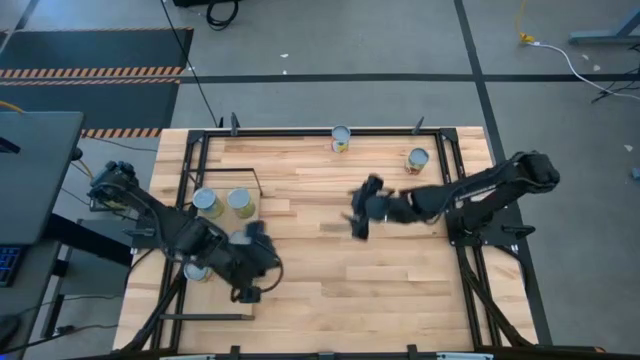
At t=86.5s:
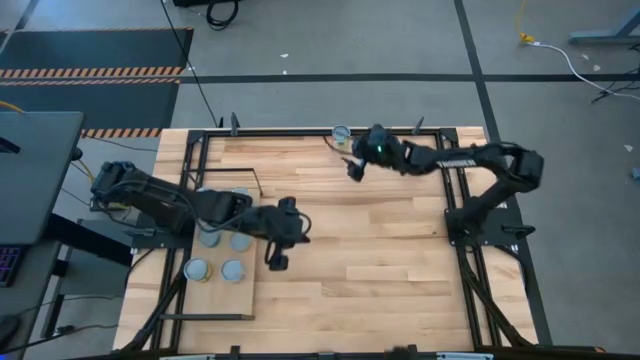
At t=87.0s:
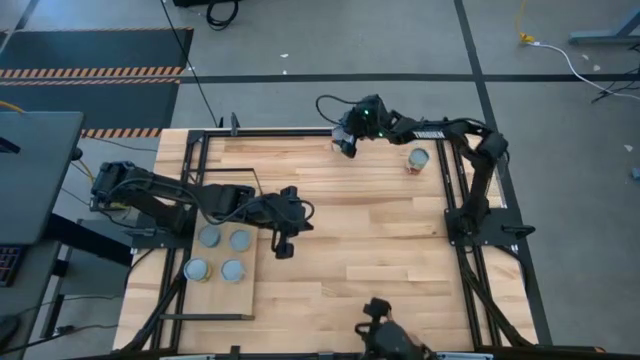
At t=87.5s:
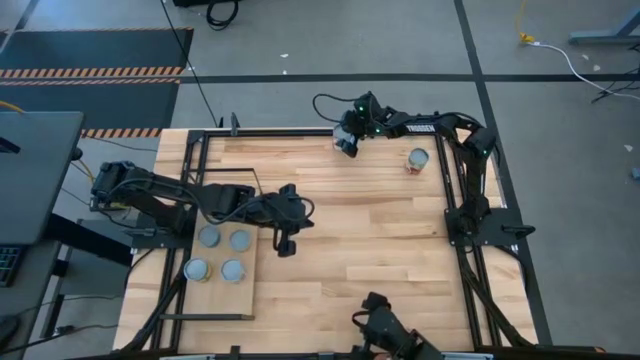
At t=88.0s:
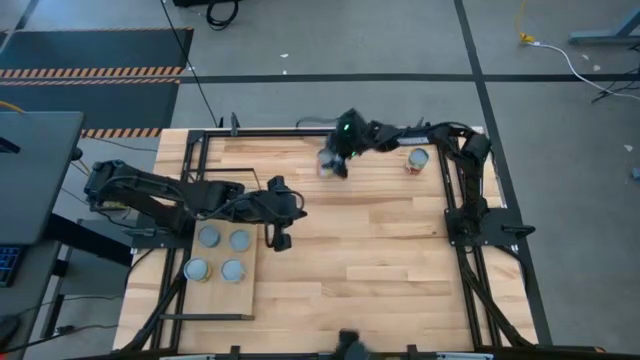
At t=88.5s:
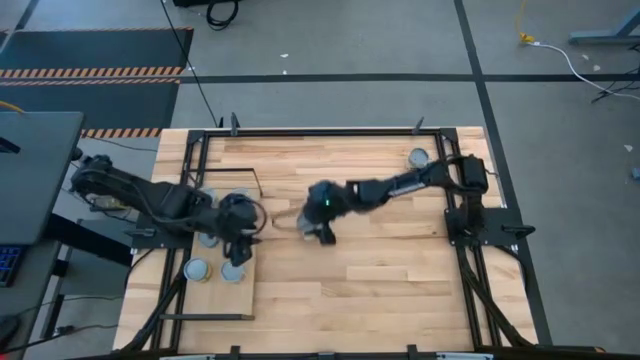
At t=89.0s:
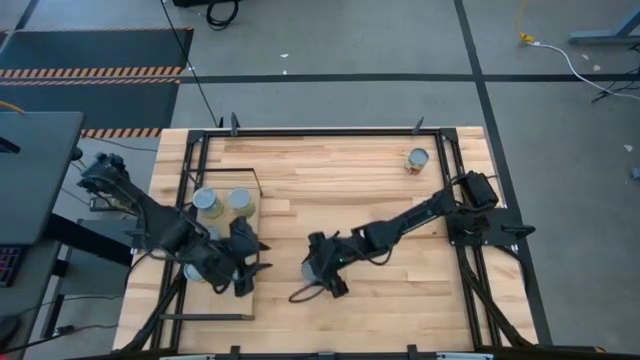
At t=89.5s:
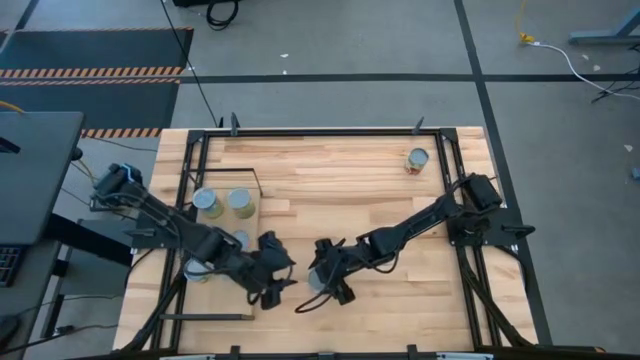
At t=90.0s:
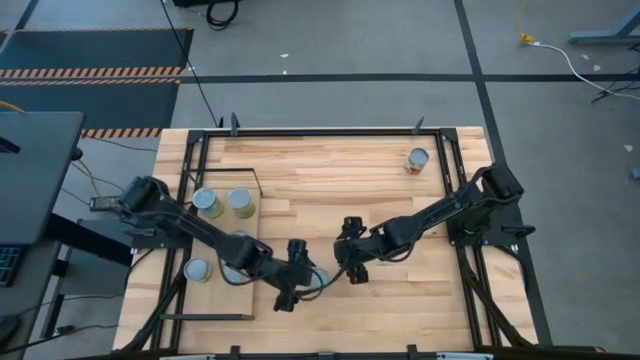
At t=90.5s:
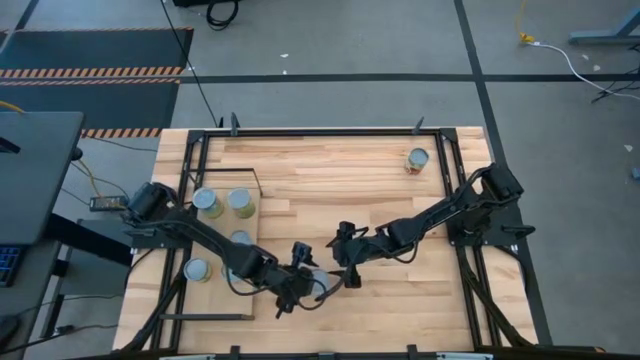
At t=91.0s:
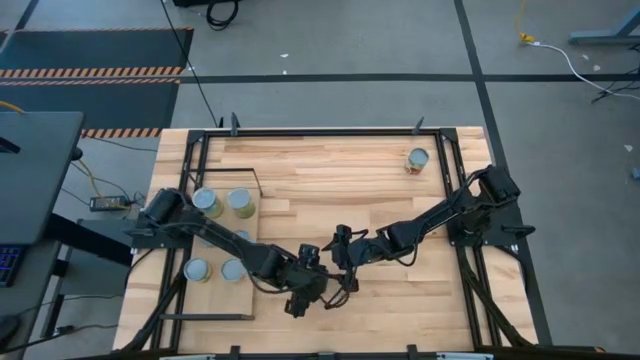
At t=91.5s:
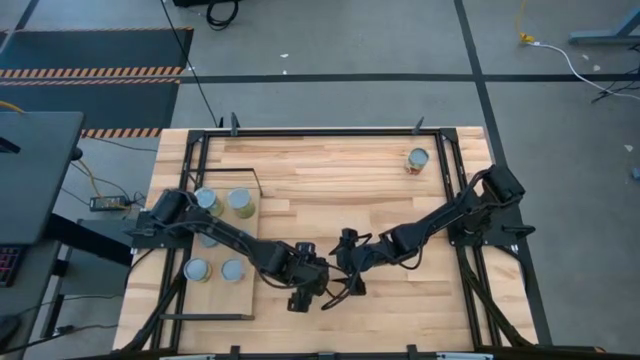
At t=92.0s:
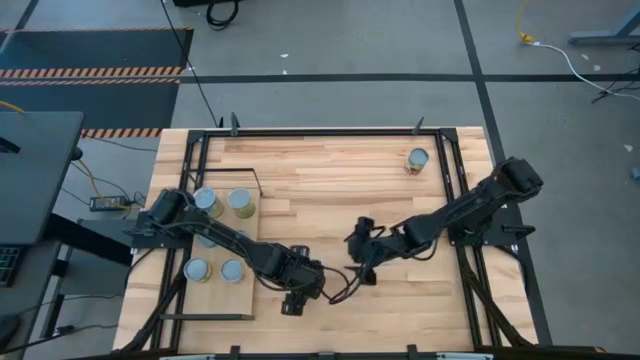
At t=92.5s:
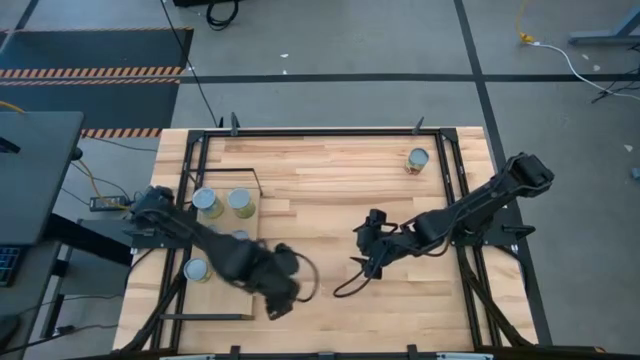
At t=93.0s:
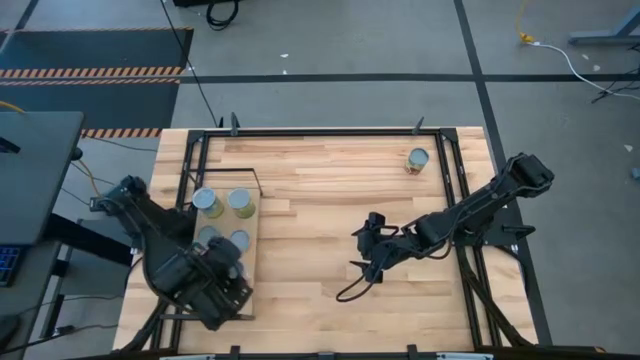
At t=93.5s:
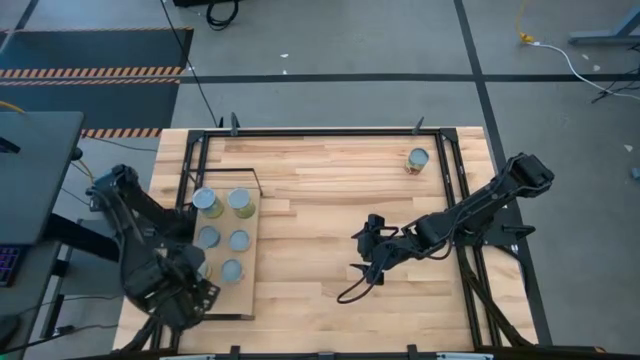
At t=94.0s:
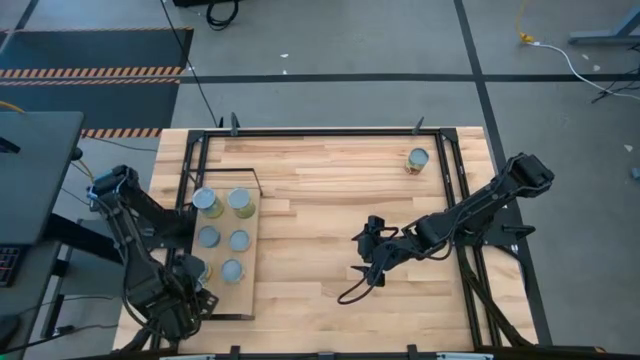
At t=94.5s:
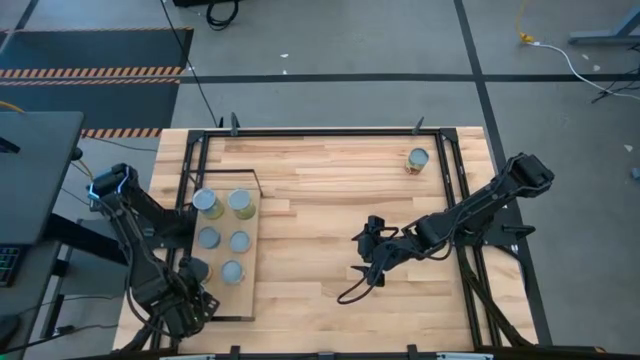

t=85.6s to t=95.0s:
Task: Pick and place cans onto a shelf
Put the canned mixed fruits on the shelf

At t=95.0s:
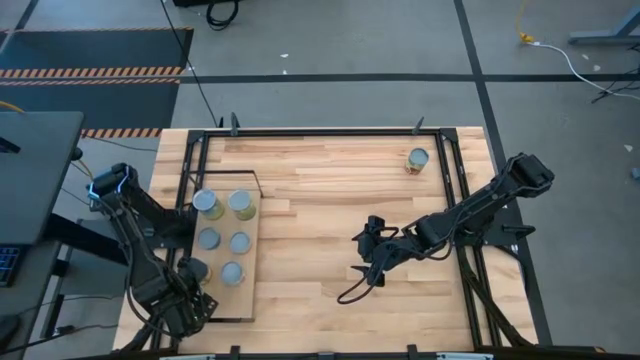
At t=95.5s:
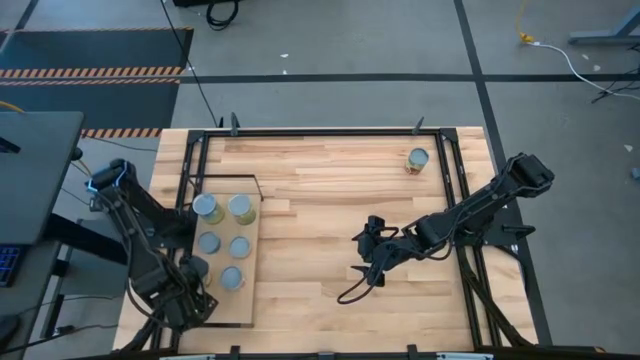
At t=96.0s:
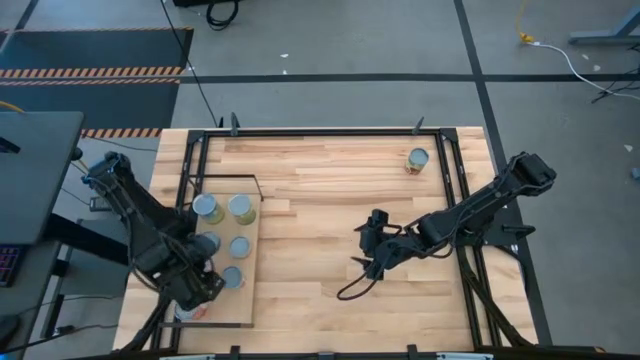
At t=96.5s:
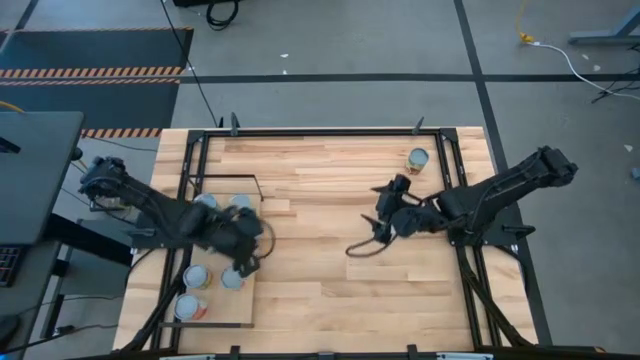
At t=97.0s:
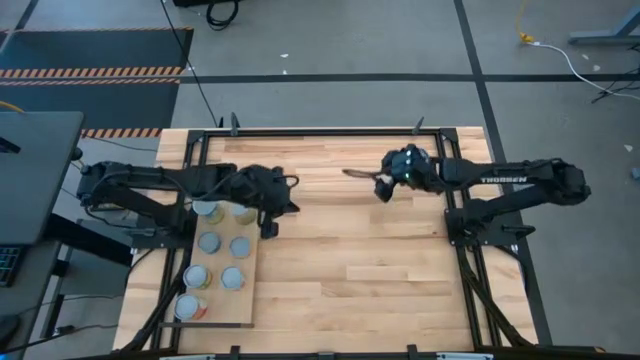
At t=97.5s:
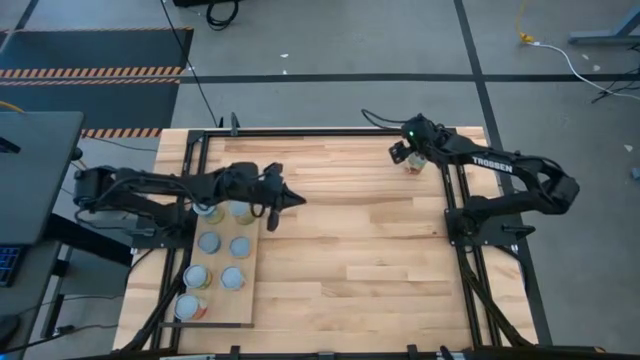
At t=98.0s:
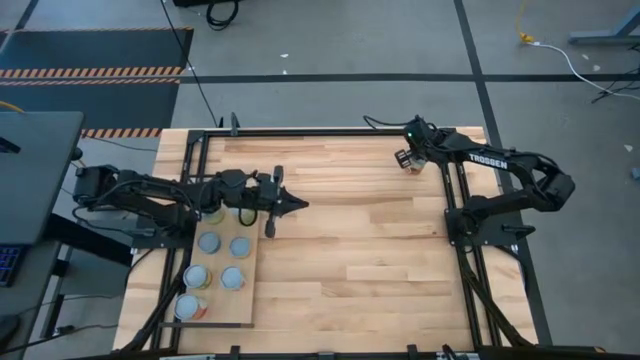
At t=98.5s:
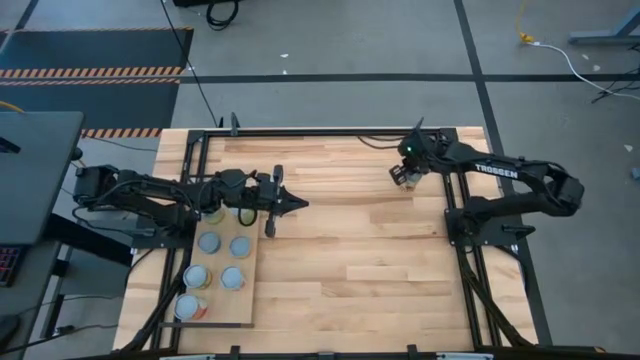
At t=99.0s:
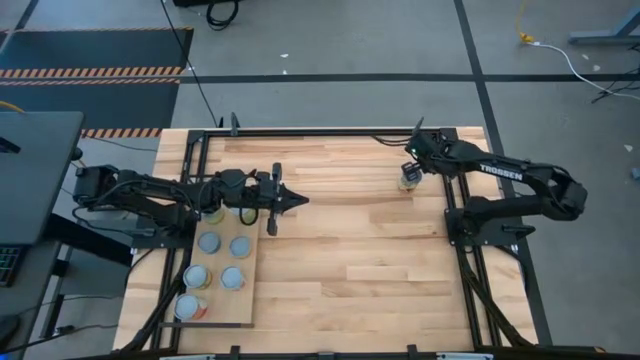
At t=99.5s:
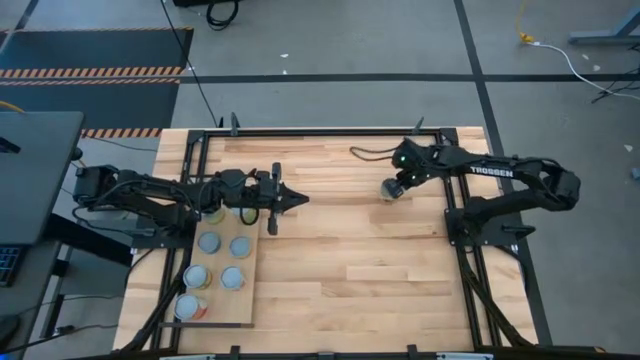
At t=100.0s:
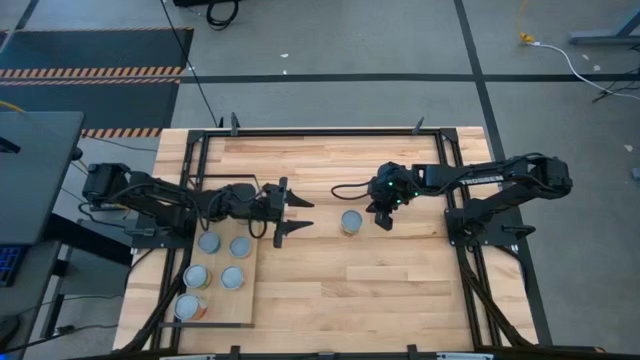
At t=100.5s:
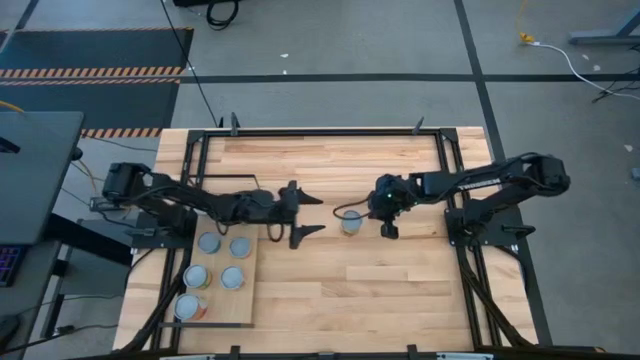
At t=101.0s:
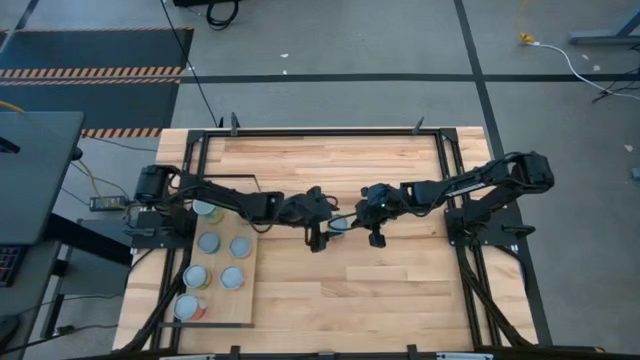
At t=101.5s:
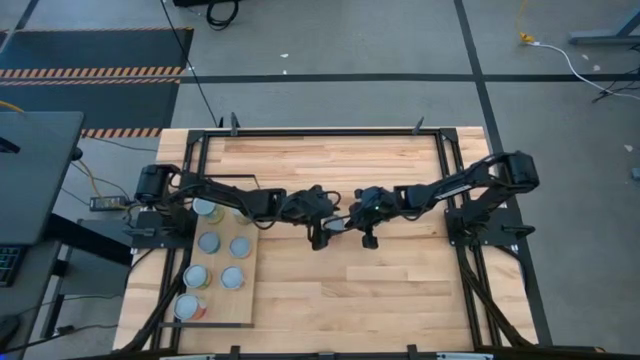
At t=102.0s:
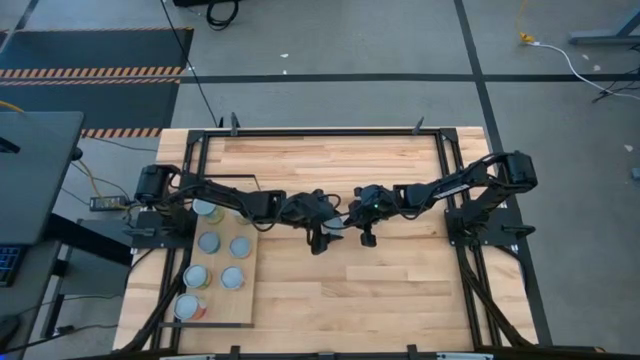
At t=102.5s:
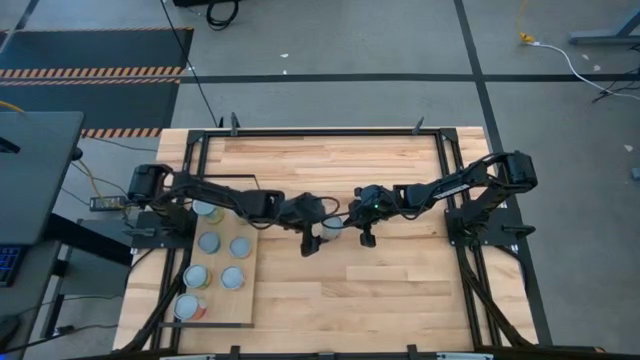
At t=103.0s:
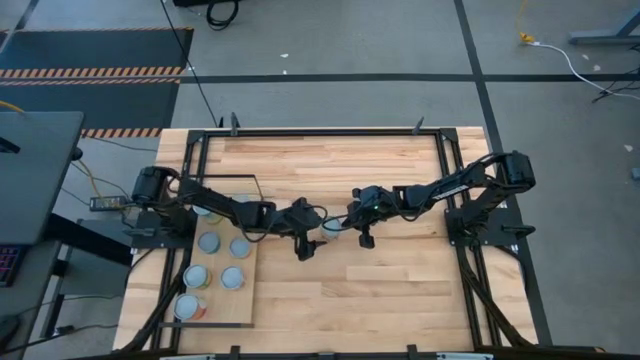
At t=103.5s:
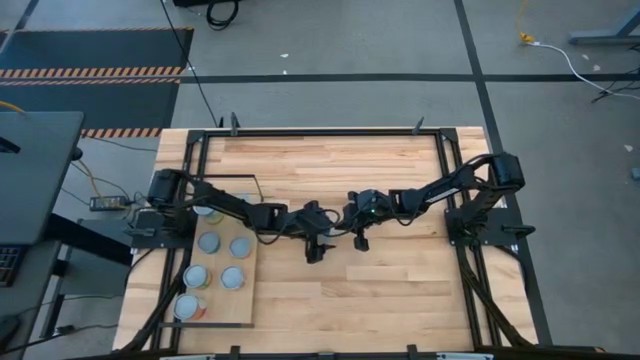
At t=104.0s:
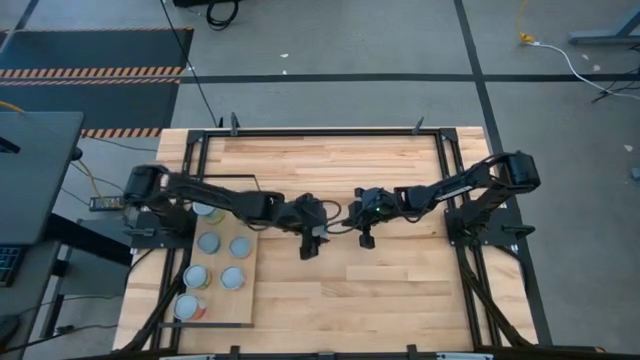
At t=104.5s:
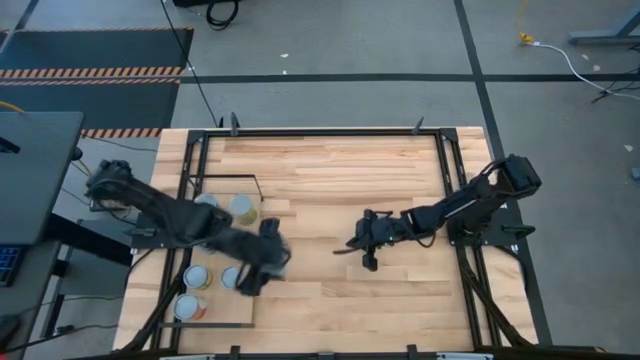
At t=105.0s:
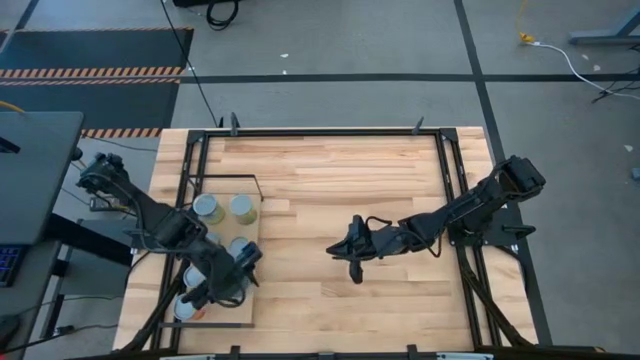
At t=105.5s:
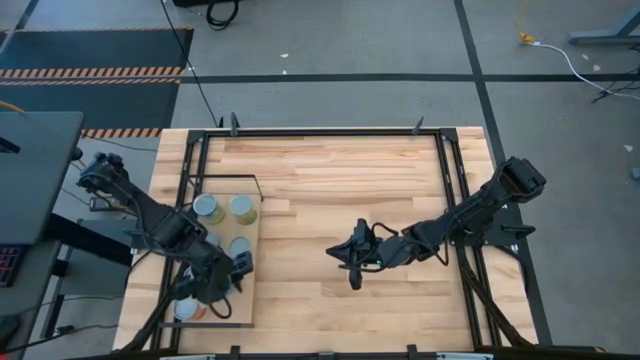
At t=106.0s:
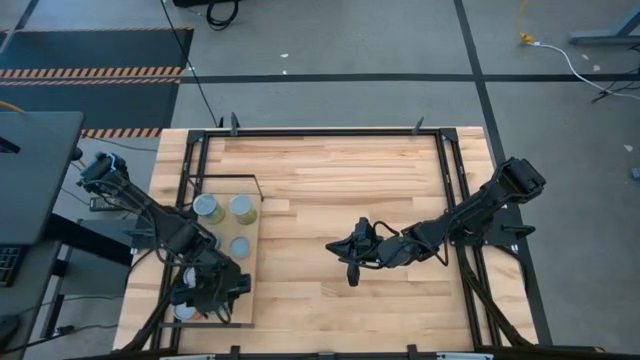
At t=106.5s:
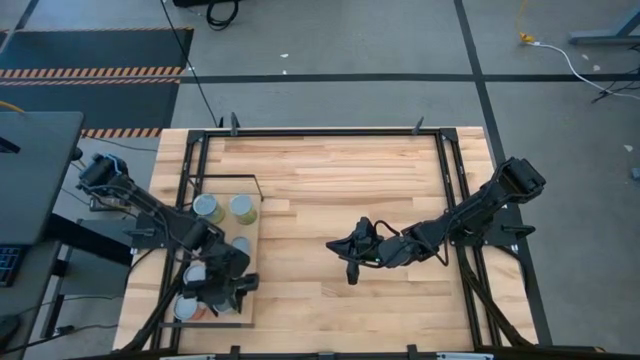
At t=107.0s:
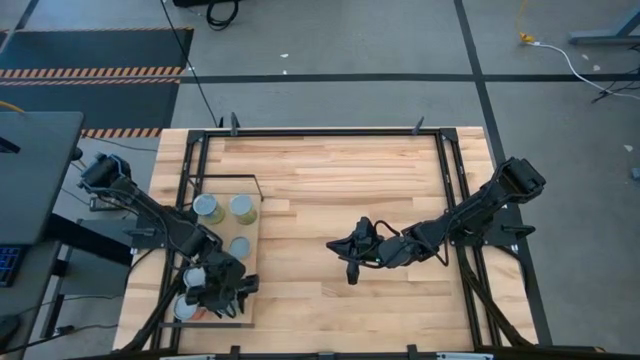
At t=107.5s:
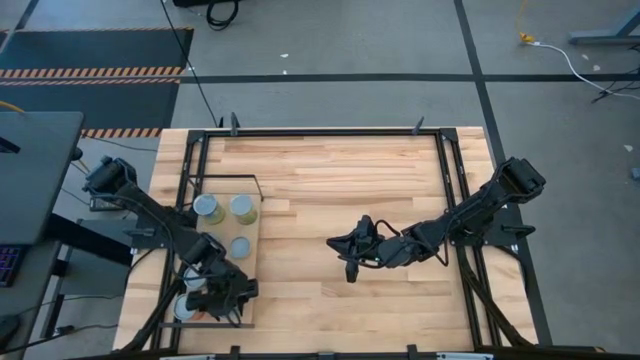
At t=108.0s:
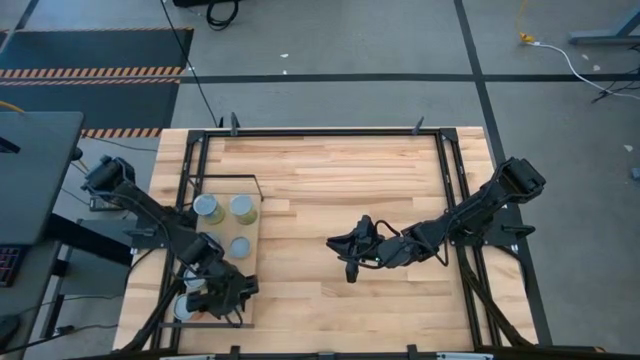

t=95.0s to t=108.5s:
Put the canned spaghetti sauce on the shelf
